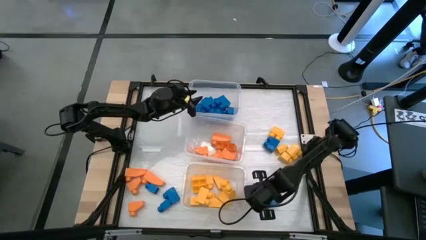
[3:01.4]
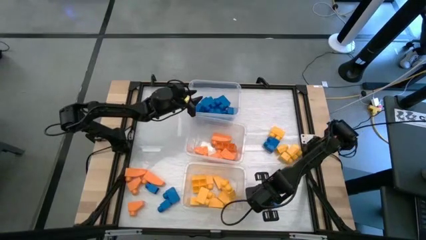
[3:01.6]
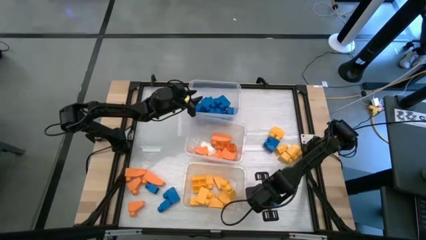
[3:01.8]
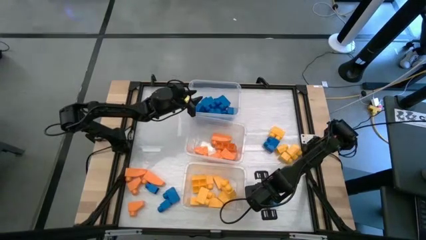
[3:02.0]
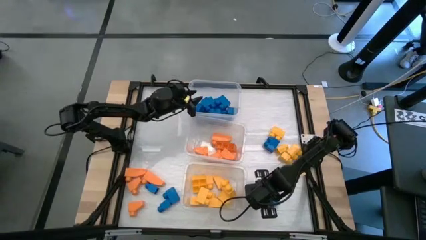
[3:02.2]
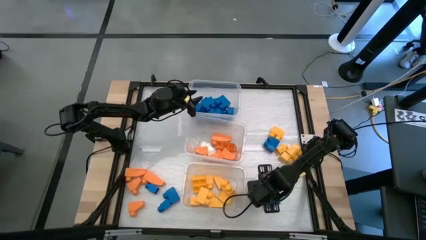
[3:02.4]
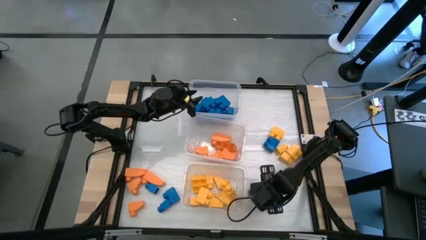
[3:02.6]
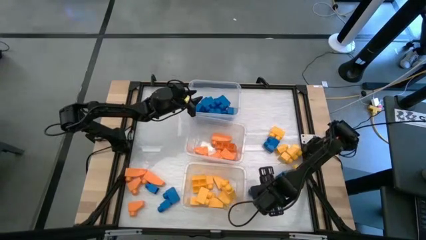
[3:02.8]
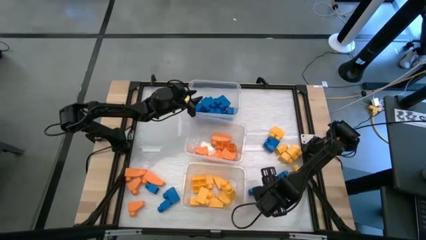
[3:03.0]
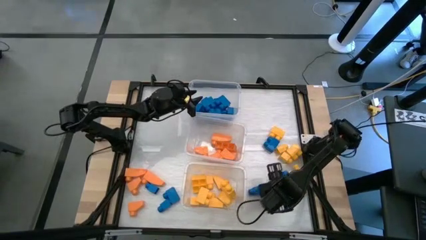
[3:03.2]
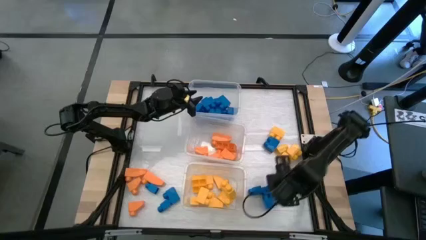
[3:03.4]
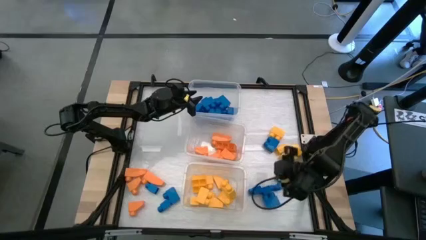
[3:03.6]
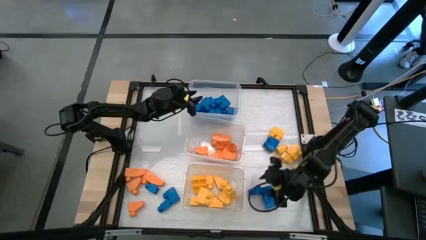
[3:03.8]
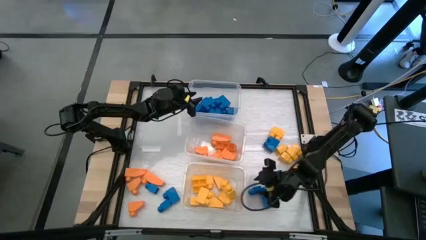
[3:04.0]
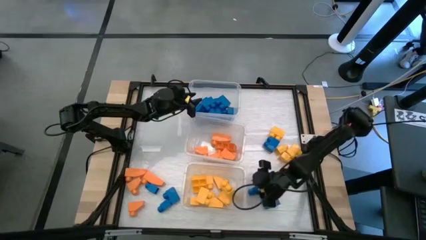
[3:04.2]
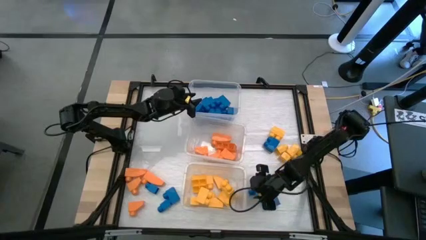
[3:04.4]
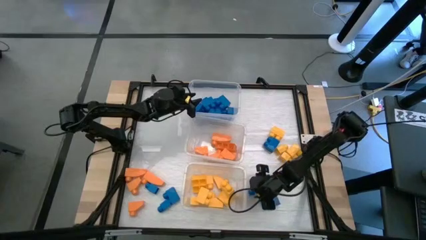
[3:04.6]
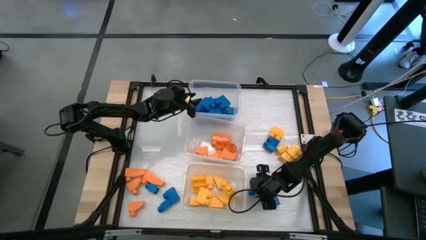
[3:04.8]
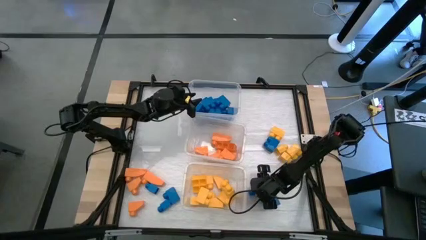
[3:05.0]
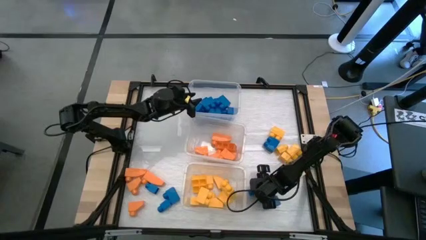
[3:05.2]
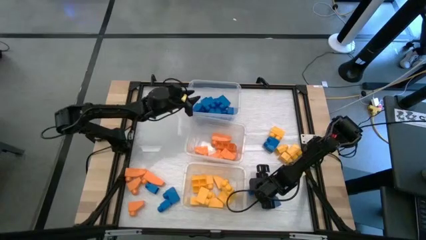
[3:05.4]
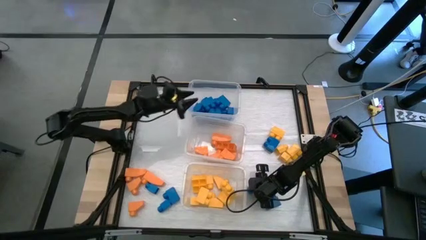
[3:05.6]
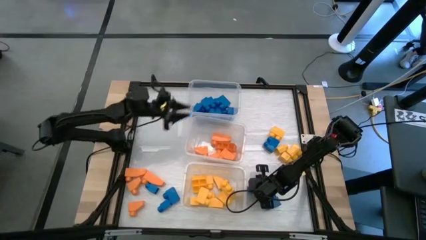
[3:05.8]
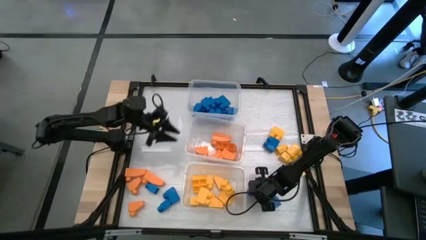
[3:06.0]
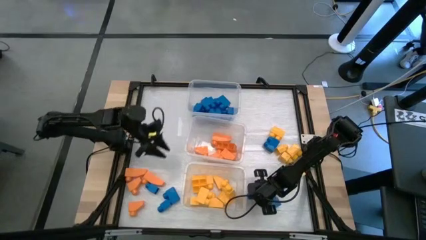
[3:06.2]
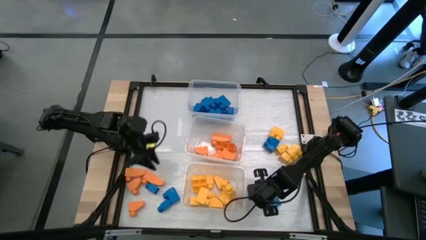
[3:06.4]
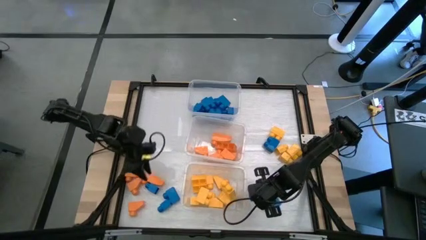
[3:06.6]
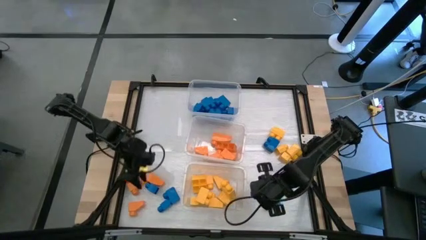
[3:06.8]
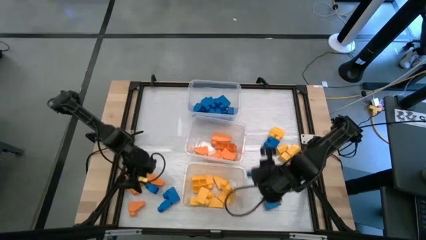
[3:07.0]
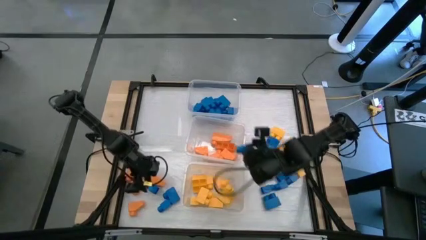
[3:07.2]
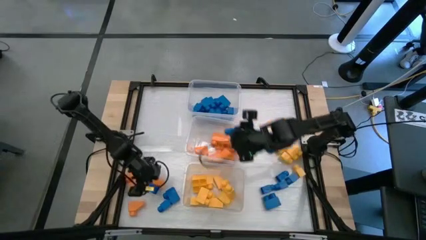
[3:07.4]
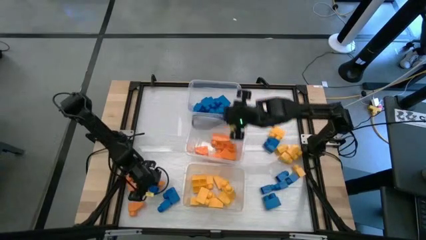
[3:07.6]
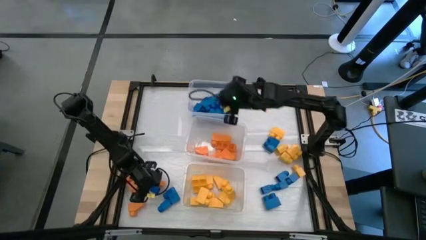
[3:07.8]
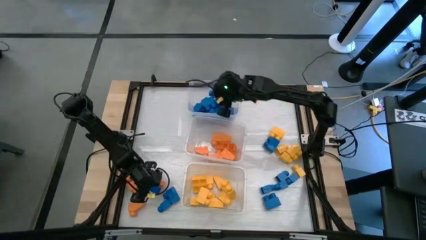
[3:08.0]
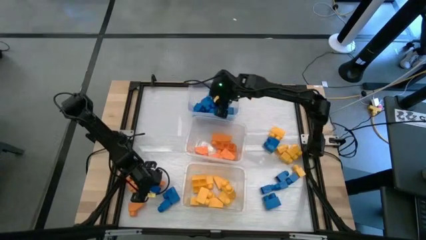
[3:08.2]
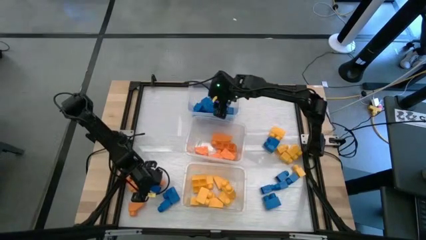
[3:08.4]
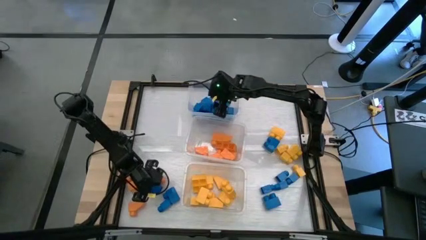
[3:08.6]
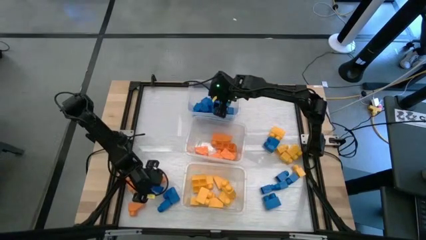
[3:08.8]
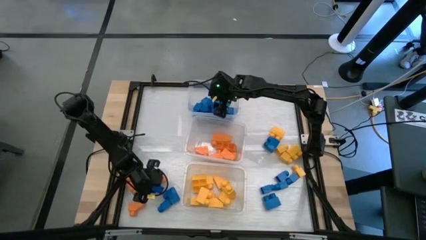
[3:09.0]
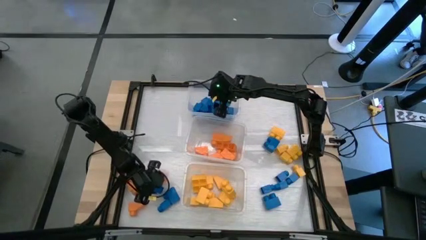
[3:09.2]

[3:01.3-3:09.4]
Task: Sort blocks
Put the blue game piece into the top transparent bin

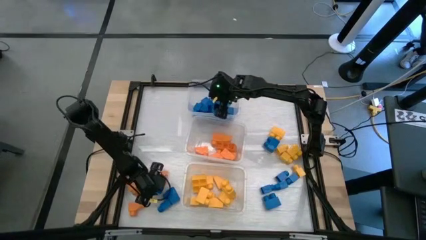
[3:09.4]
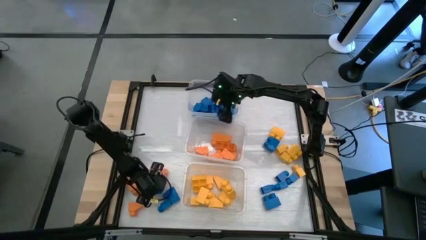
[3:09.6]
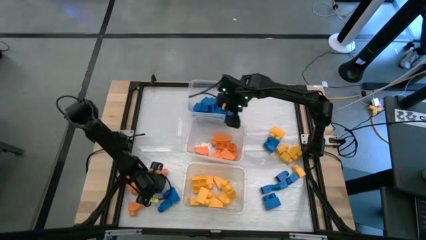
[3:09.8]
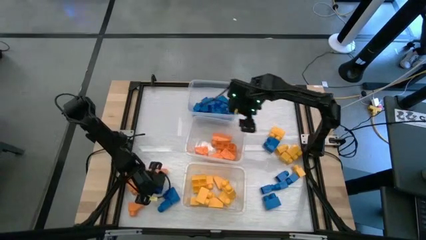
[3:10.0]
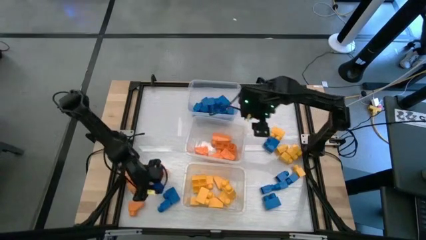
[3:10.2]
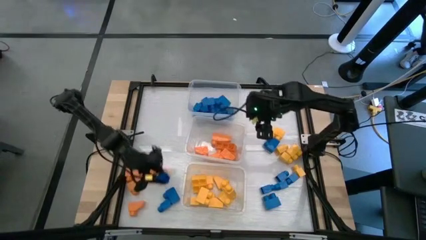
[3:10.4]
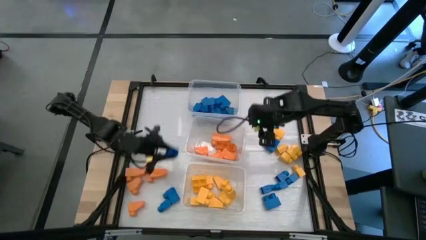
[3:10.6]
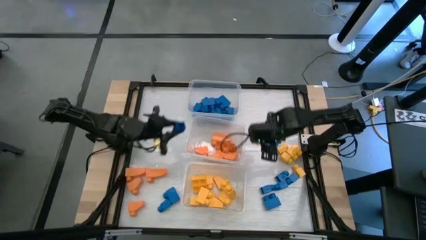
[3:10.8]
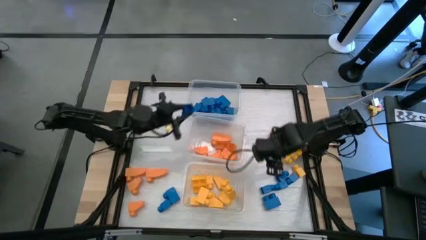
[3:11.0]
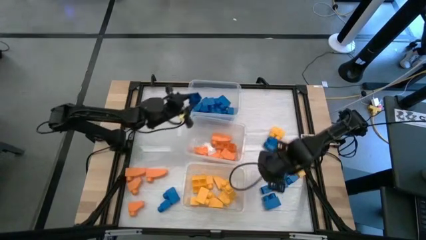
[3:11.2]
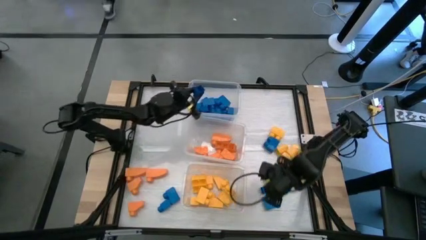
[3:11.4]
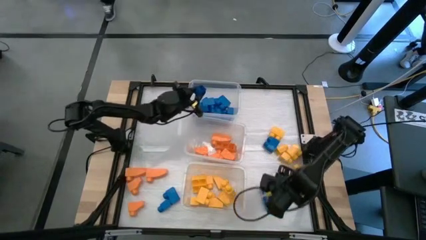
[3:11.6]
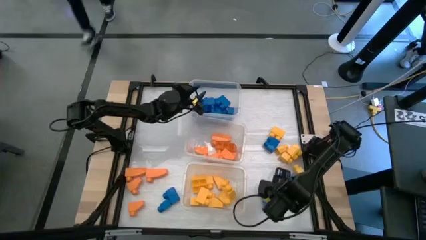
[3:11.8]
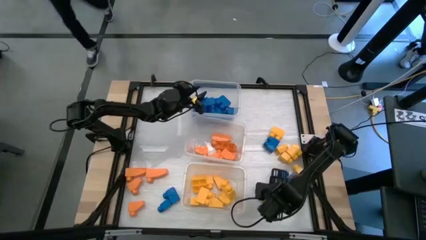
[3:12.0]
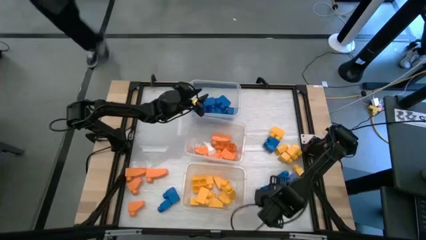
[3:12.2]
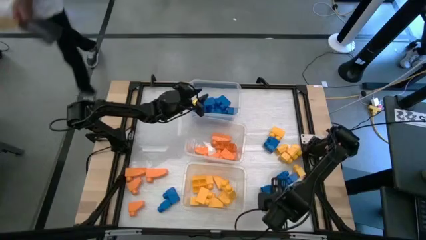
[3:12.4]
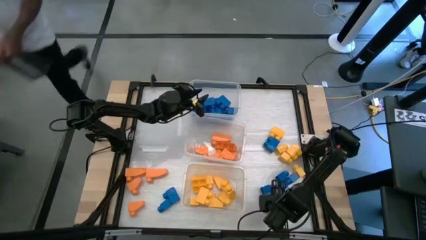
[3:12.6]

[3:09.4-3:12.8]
Put the blue game piece into the top transparent bin

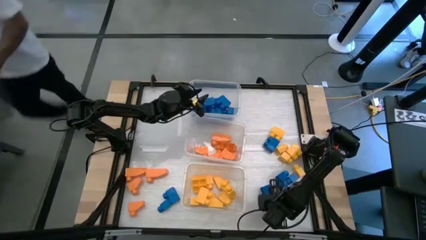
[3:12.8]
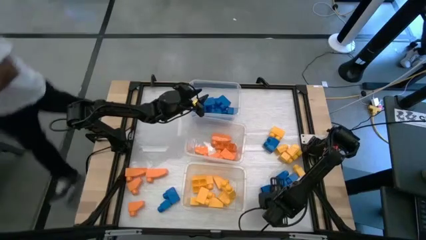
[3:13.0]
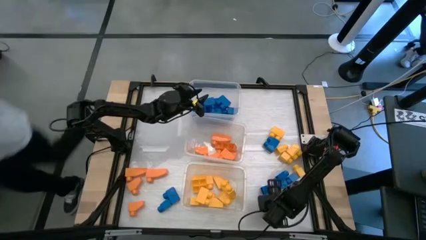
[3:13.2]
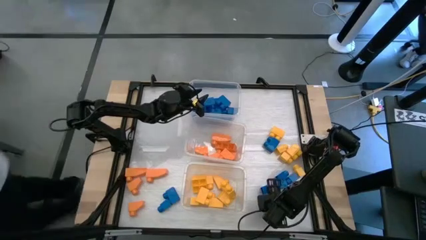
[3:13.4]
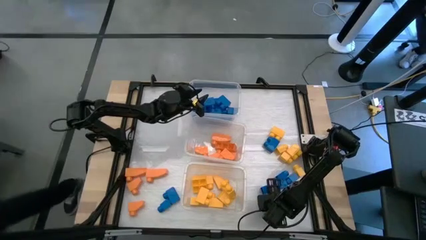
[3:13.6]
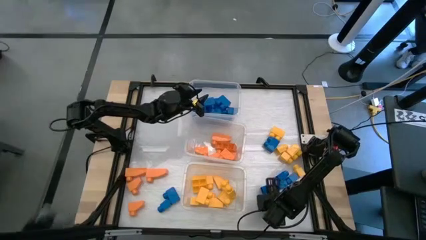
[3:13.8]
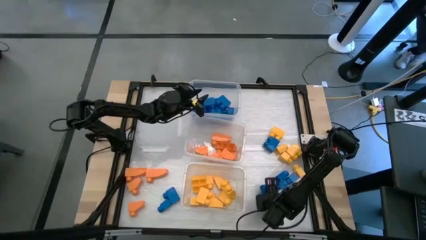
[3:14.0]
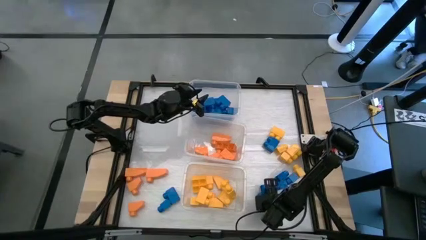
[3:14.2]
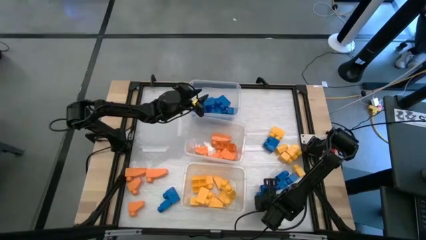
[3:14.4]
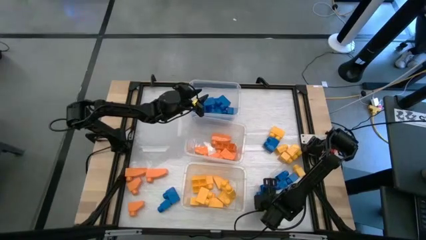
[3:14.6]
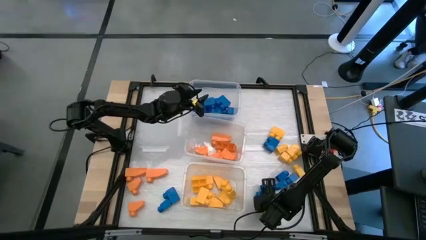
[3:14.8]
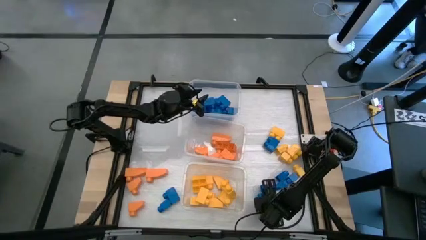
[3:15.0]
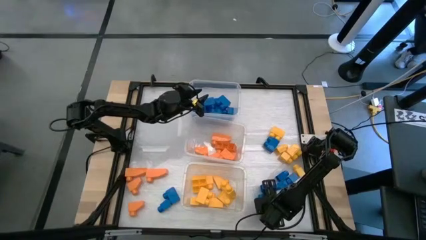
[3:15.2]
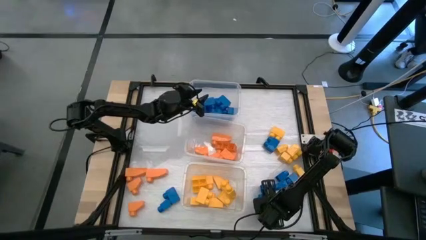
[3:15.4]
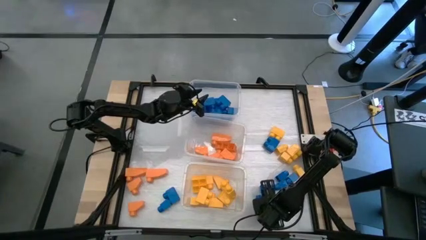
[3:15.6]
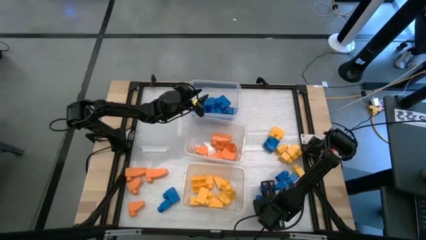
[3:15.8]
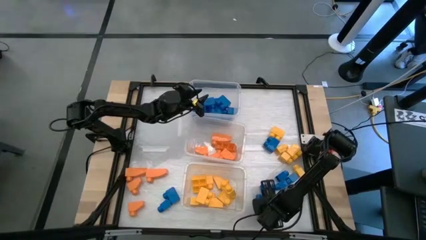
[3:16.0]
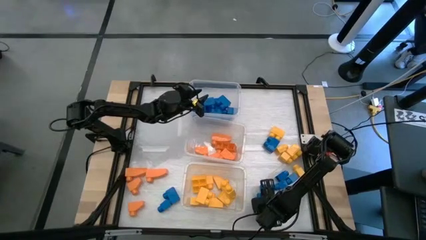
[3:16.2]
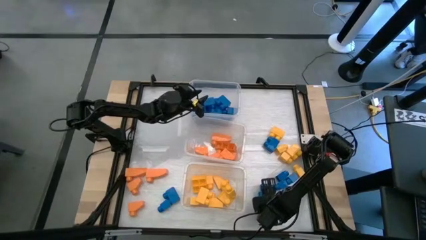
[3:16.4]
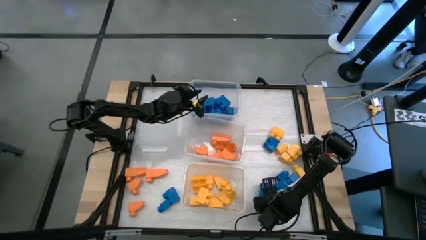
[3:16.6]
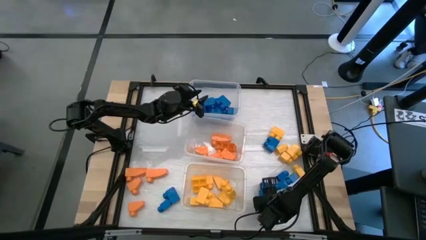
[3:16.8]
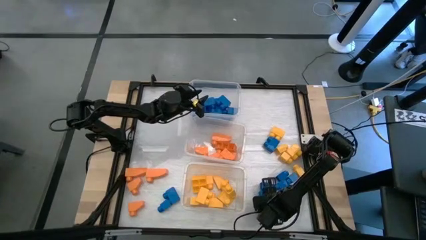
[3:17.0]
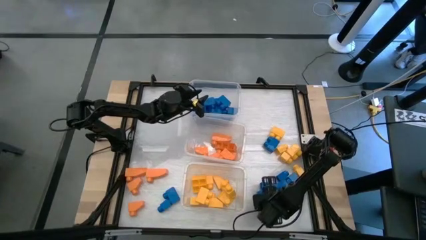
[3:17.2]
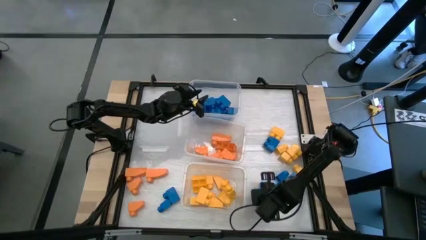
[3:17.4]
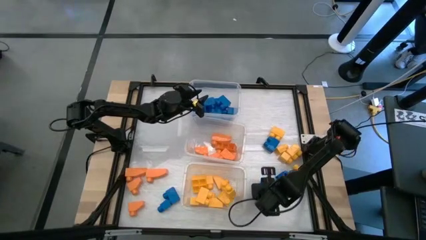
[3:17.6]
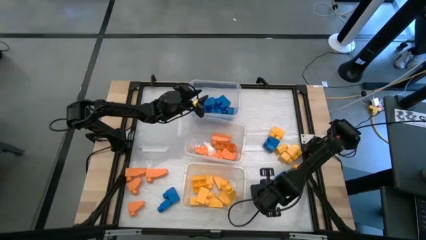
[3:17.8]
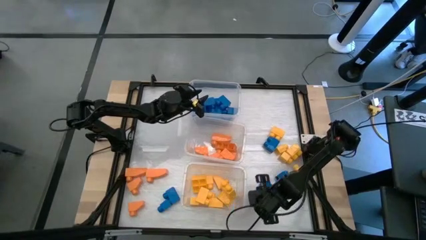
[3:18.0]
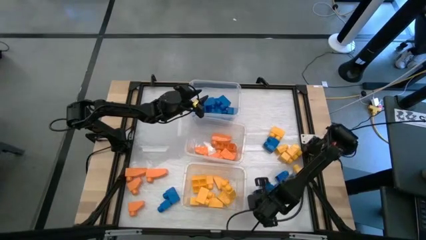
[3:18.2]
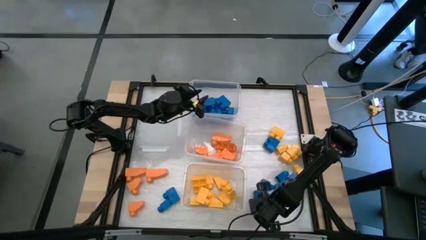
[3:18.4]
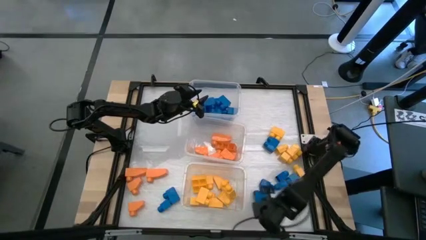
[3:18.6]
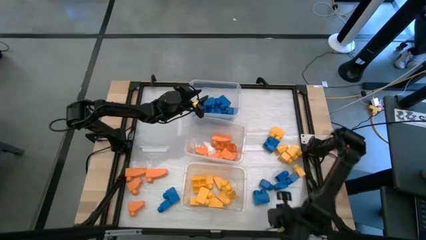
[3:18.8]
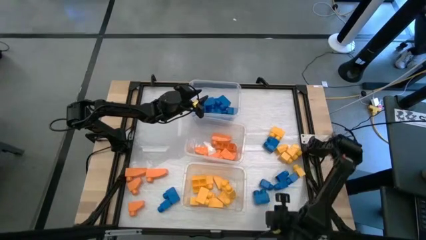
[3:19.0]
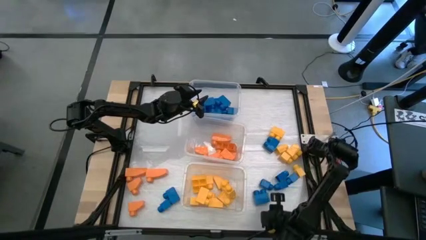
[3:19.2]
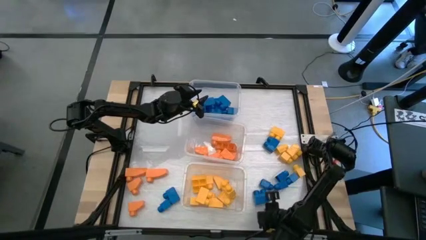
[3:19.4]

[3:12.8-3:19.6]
Put the blue game piece into the top transparent bin
